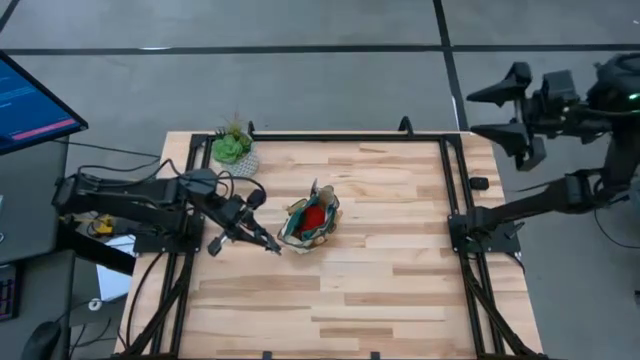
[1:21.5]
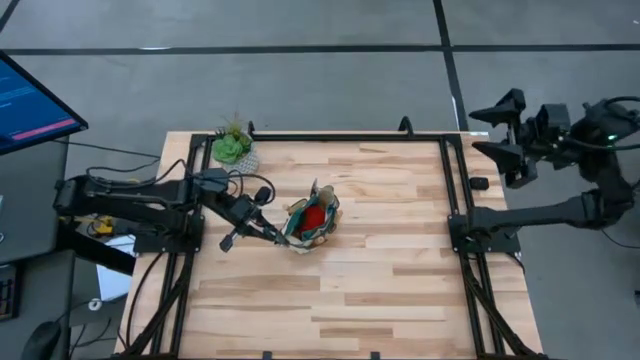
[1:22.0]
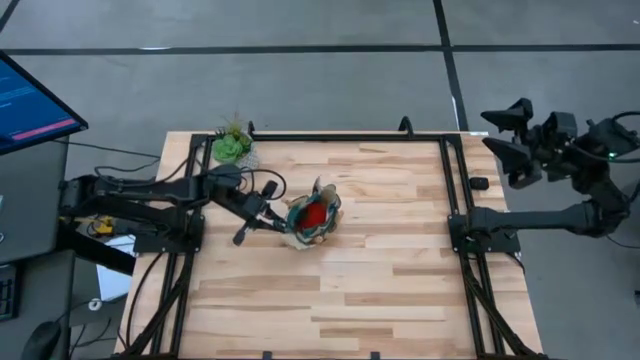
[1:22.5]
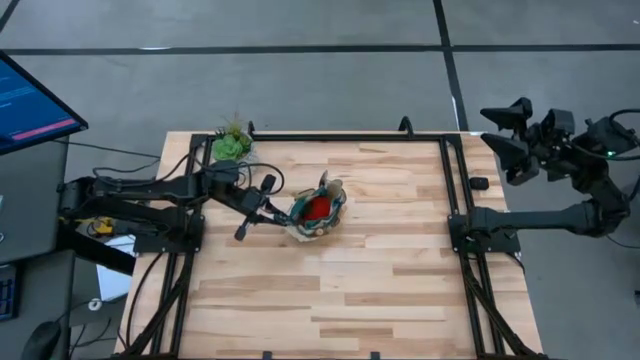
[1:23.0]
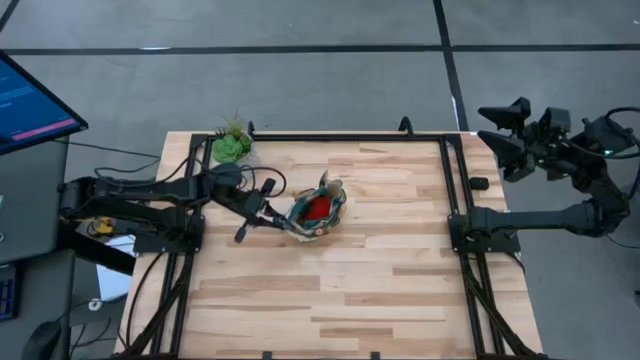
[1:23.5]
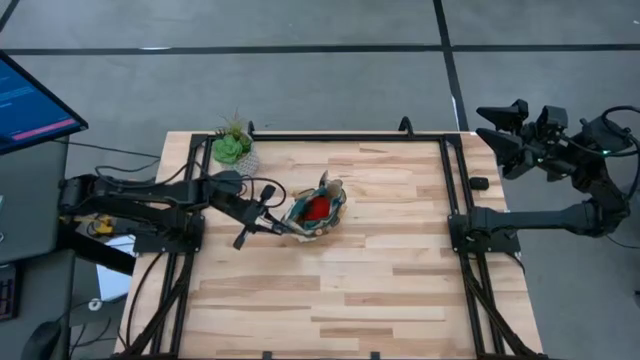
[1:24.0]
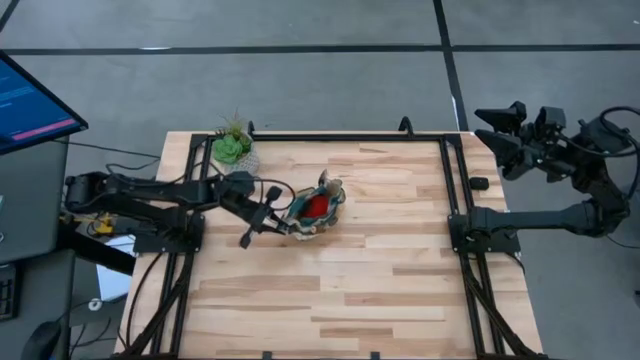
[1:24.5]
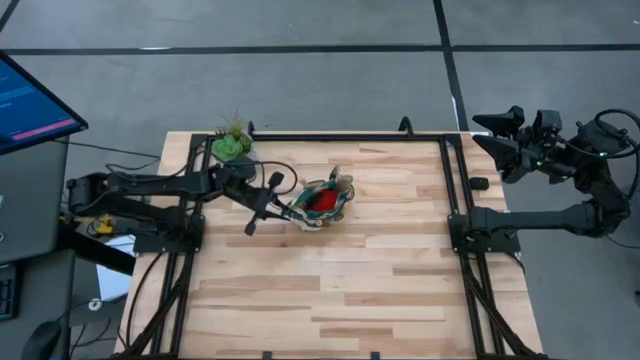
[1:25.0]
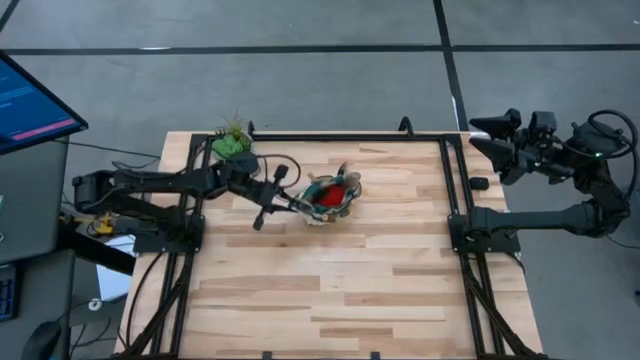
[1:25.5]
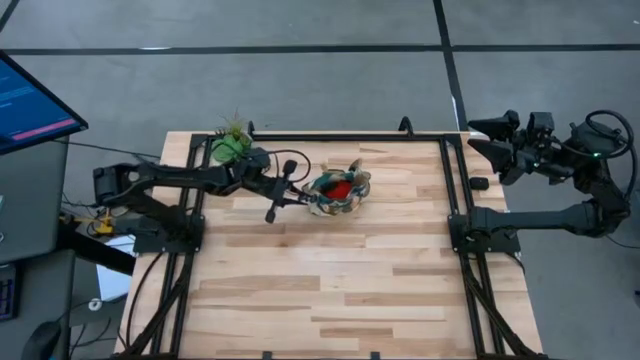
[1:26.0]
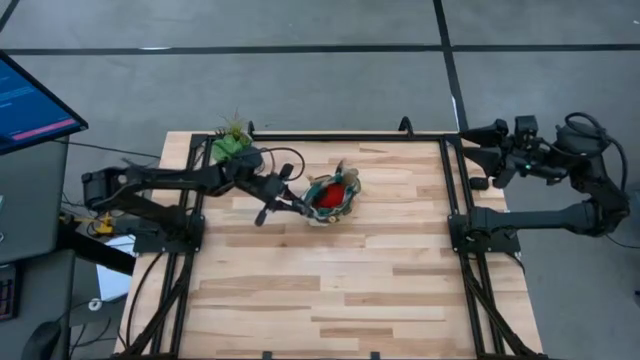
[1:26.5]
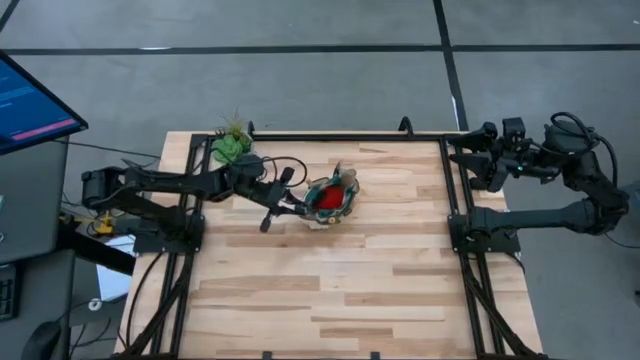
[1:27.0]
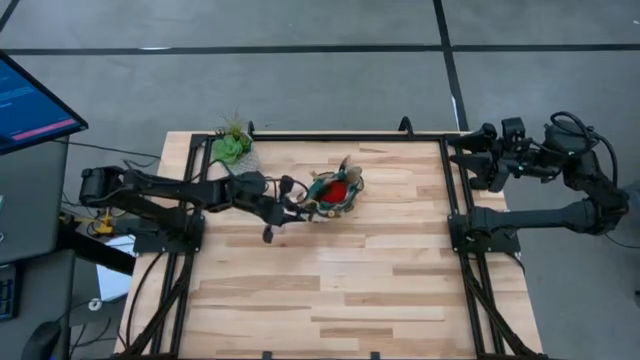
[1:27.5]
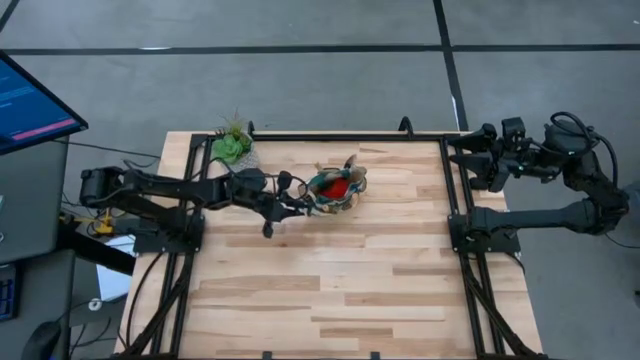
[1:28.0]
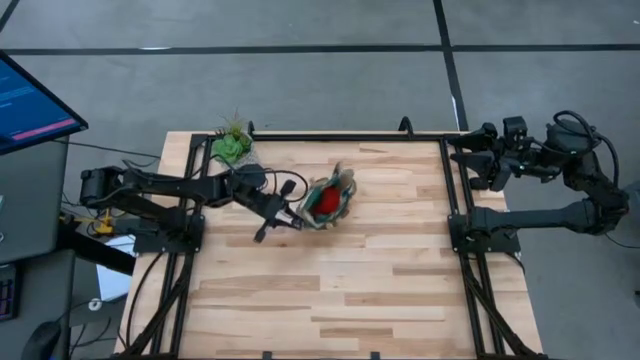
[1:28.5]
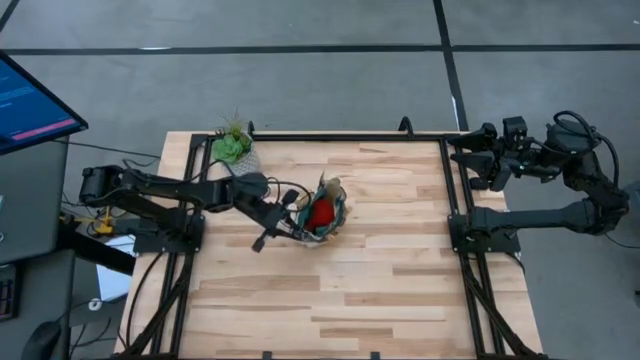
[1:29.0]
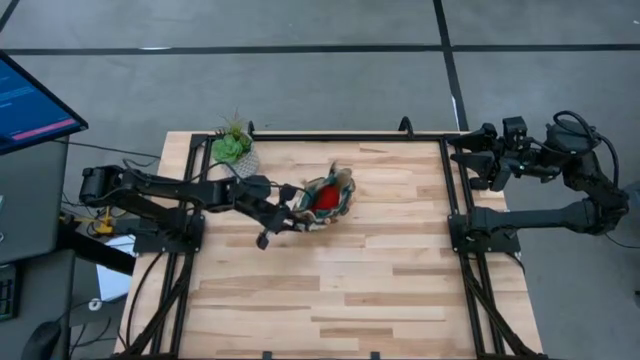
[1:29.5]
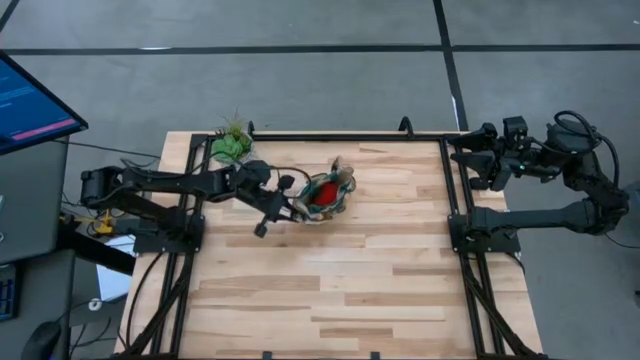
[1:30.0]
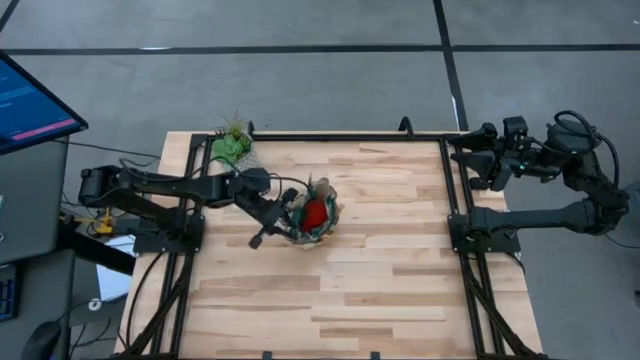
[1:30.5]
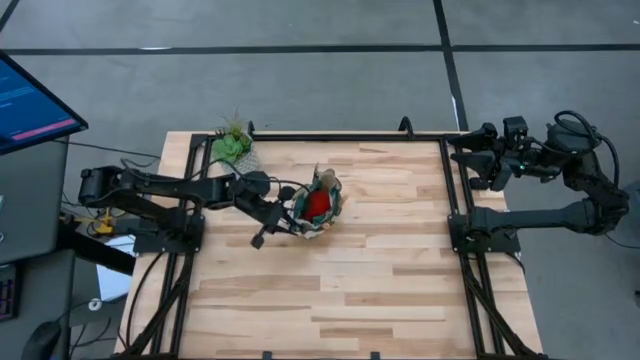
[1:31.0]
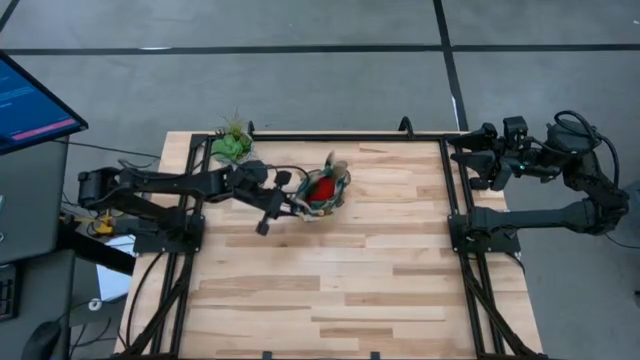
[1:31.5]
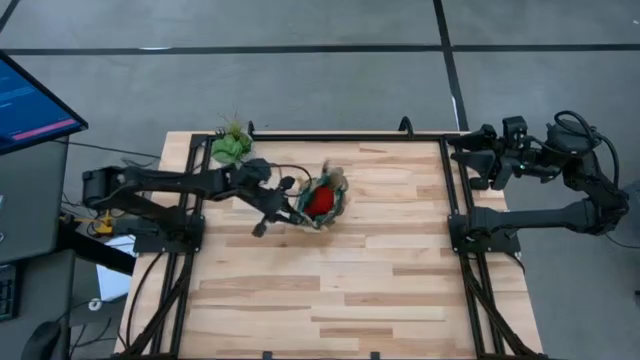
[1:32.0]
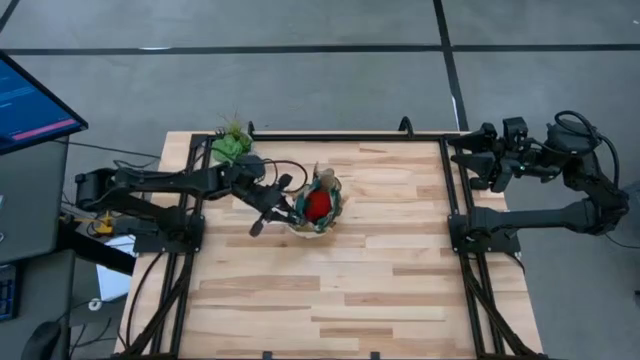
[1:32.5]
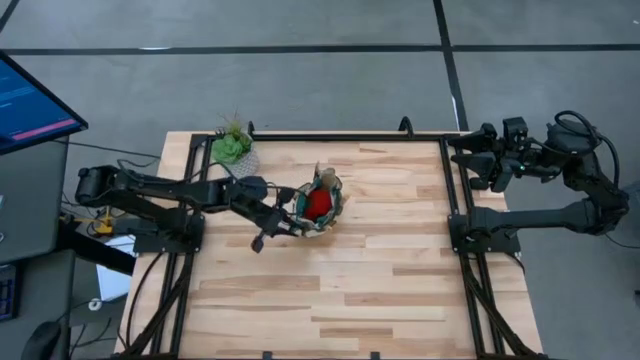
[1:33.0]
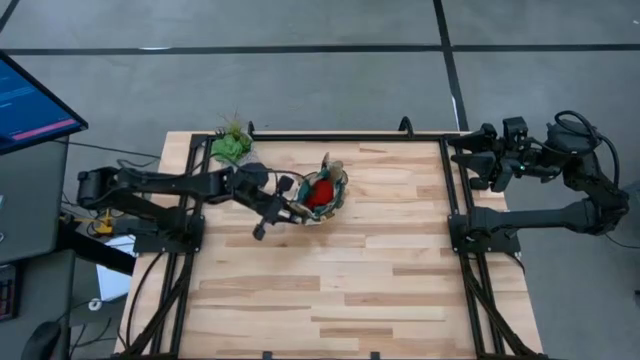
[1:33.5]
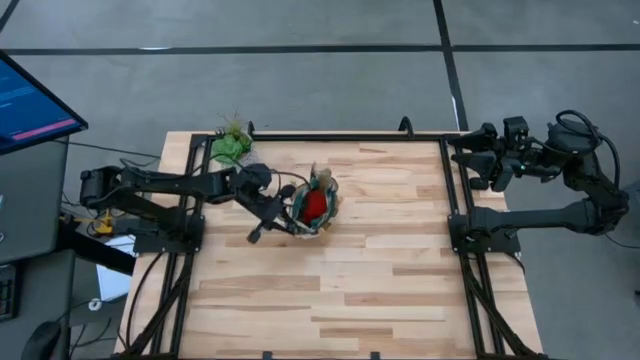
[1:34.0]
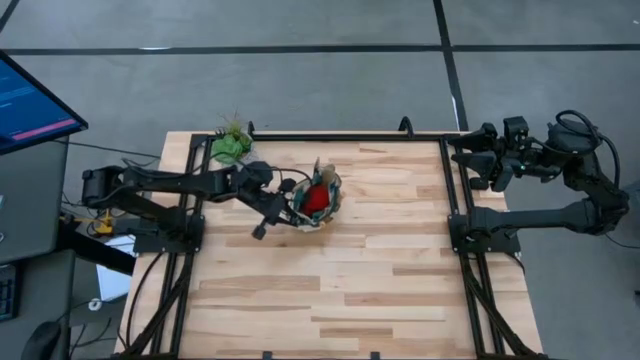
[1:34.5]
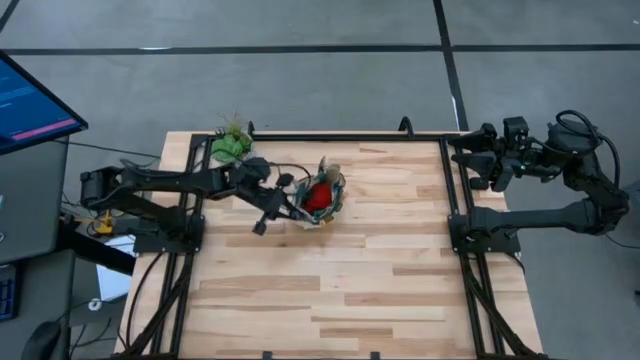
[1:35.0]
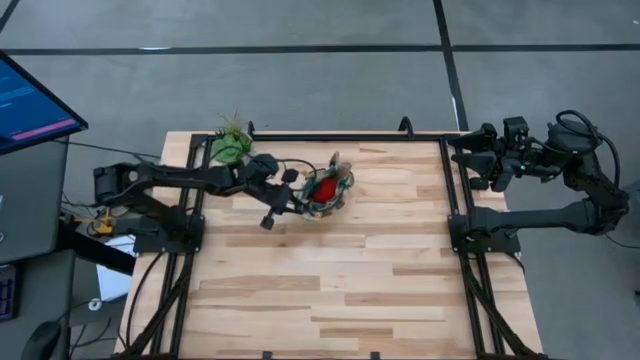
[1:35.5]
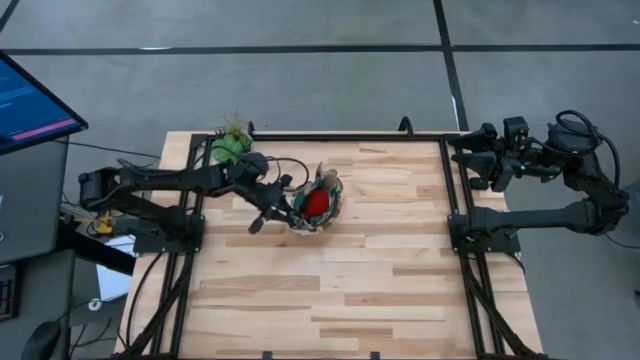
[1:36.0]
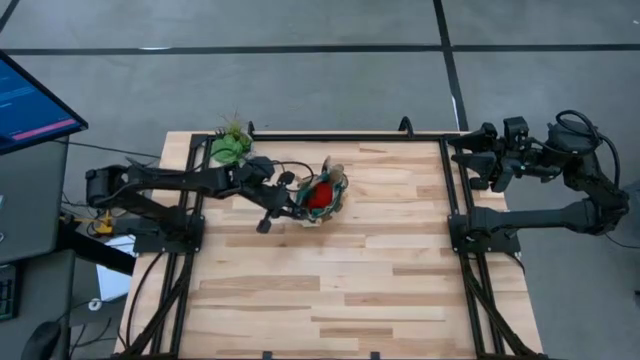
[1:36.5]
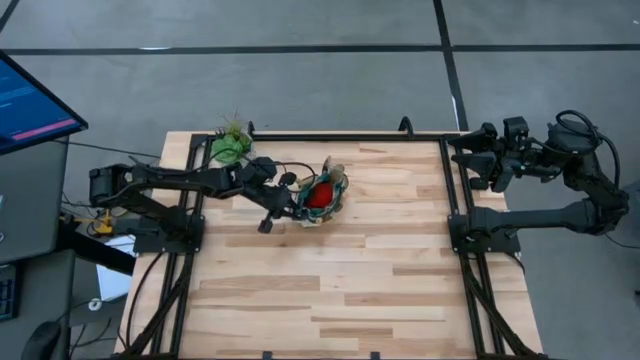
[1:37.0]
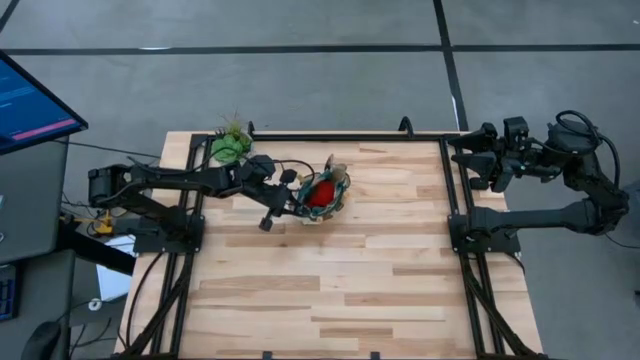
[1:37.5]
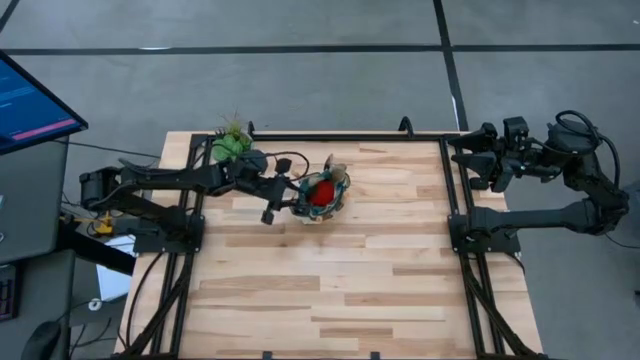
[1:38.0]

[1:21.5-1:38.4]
Task: Pick & Place Garden tools in Gardening bag
Put the shear scissors into the gardening bag
